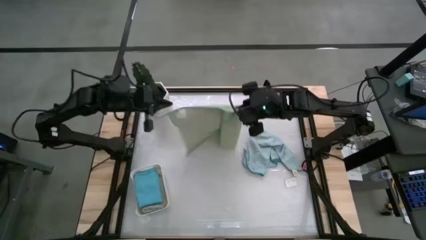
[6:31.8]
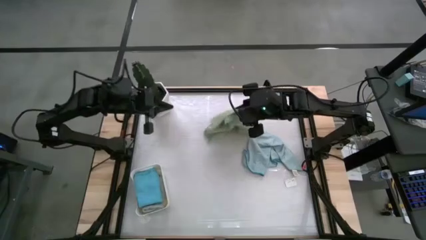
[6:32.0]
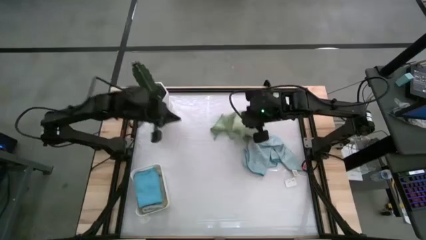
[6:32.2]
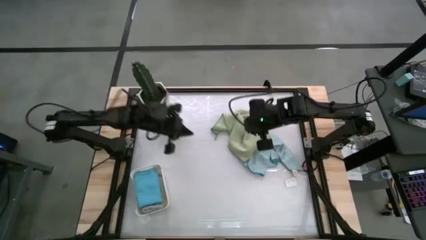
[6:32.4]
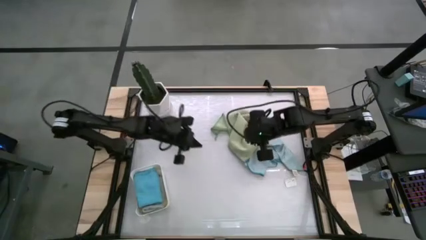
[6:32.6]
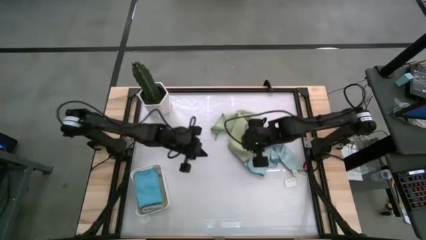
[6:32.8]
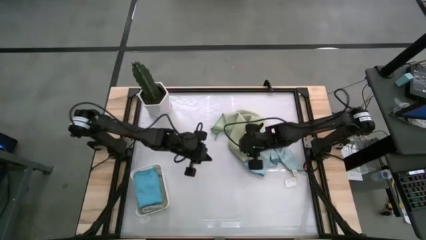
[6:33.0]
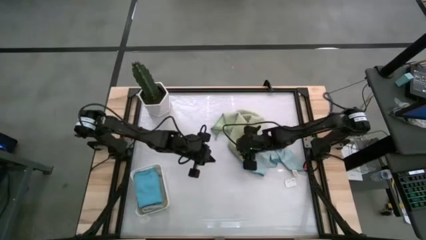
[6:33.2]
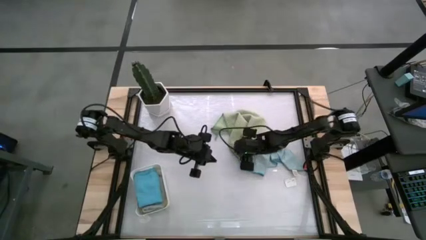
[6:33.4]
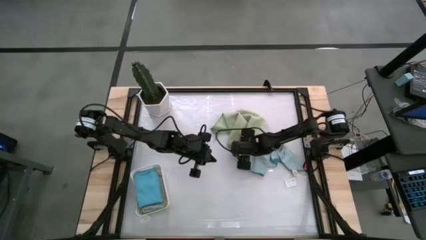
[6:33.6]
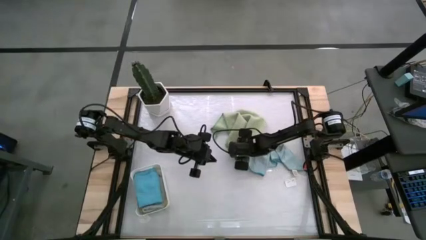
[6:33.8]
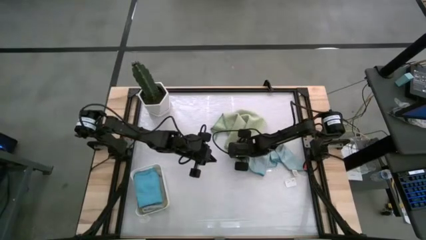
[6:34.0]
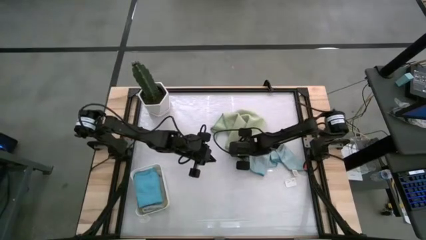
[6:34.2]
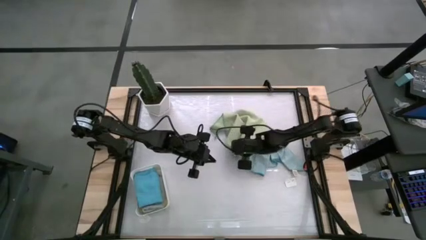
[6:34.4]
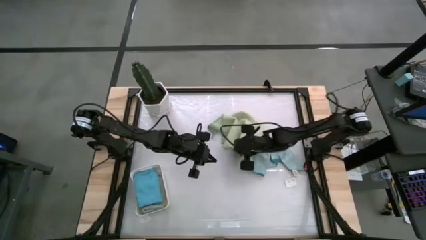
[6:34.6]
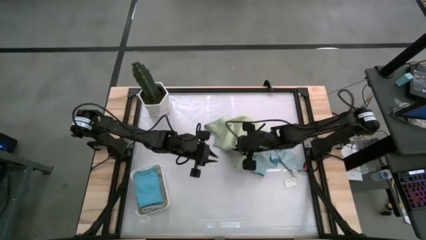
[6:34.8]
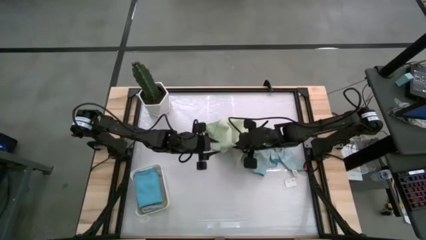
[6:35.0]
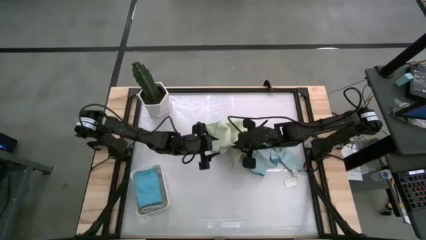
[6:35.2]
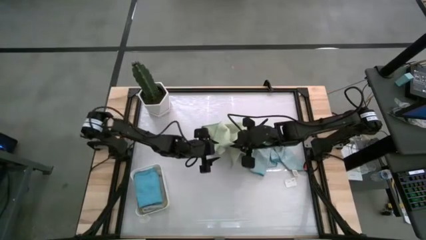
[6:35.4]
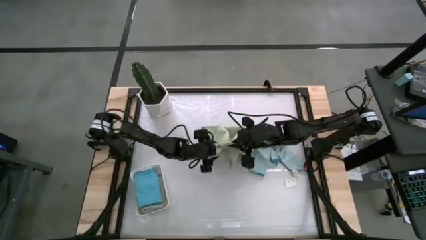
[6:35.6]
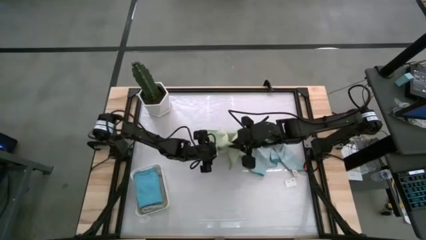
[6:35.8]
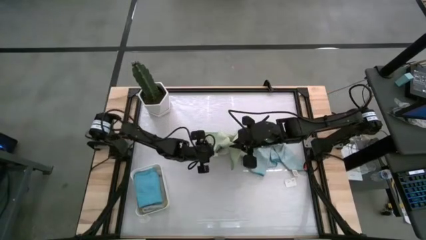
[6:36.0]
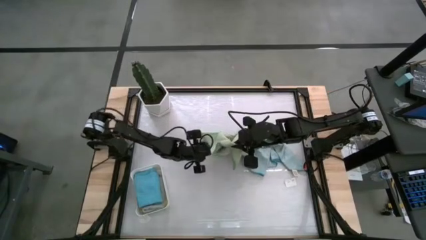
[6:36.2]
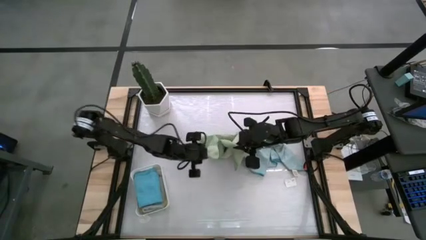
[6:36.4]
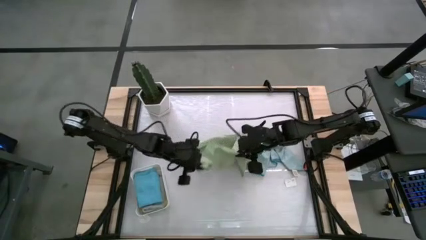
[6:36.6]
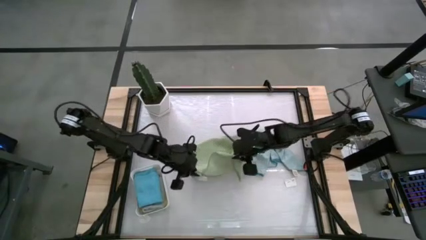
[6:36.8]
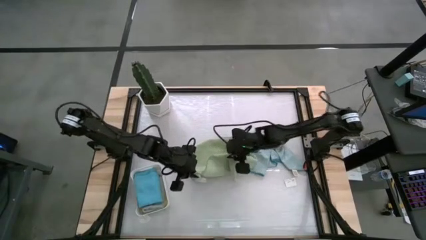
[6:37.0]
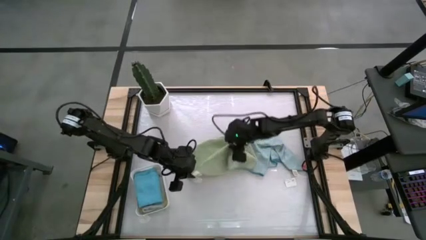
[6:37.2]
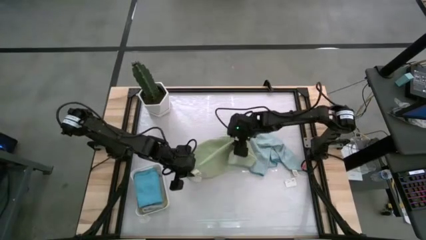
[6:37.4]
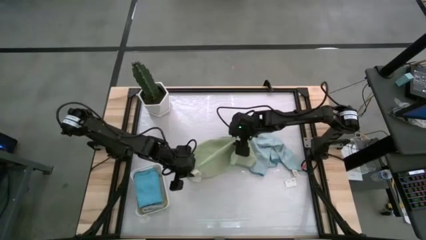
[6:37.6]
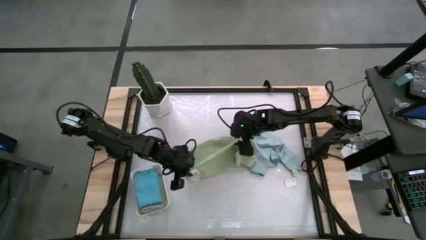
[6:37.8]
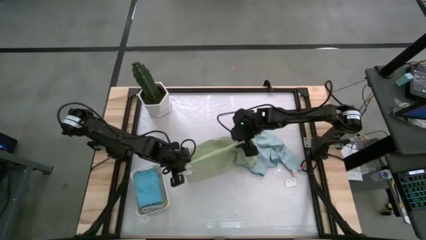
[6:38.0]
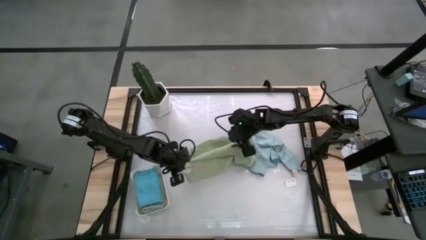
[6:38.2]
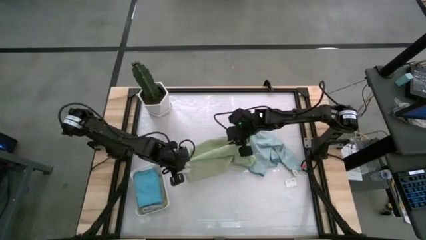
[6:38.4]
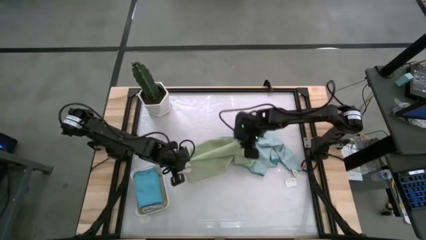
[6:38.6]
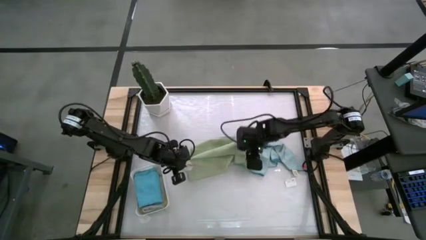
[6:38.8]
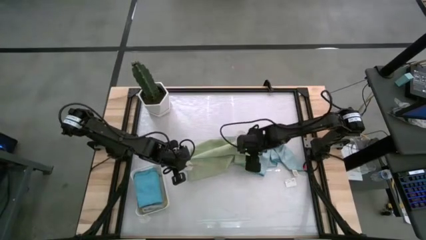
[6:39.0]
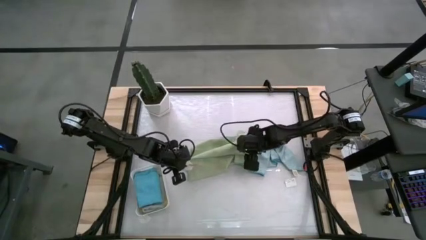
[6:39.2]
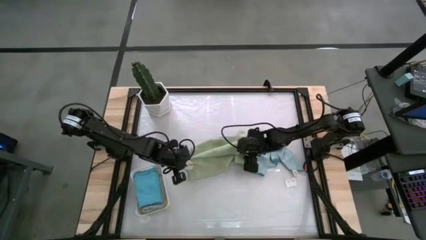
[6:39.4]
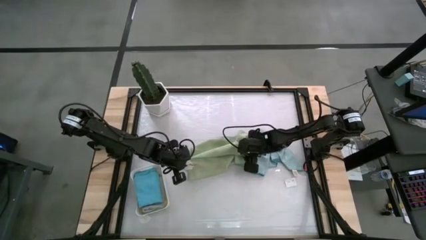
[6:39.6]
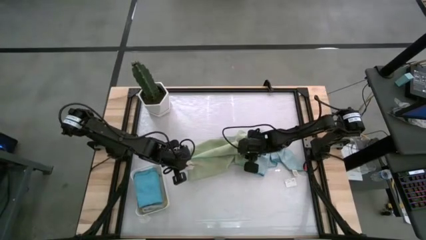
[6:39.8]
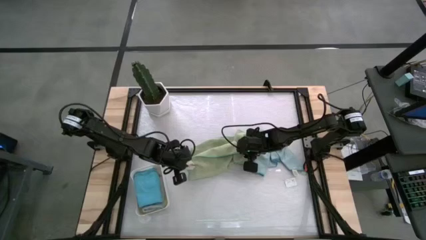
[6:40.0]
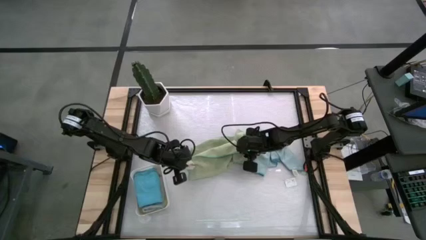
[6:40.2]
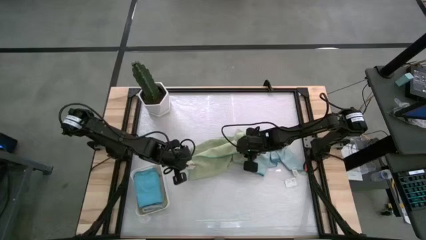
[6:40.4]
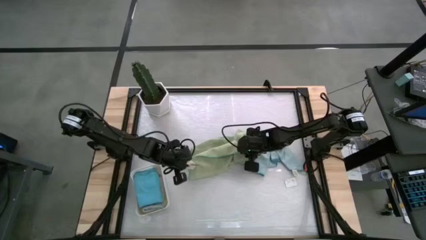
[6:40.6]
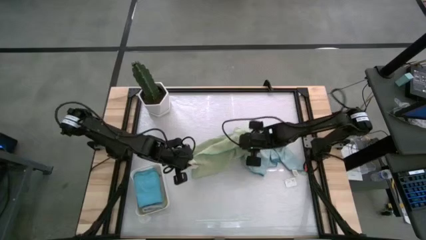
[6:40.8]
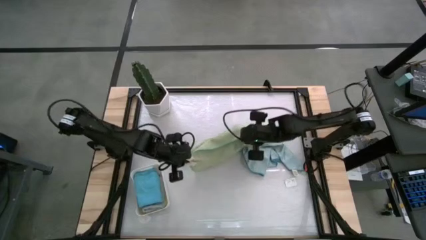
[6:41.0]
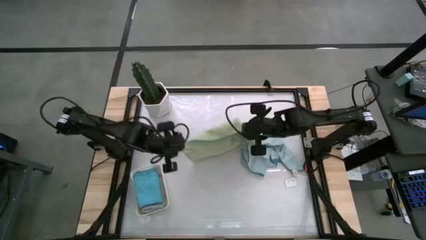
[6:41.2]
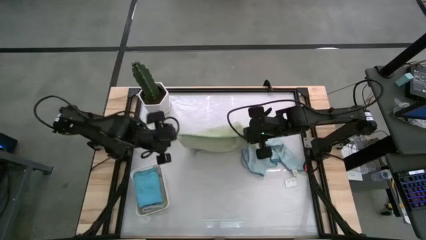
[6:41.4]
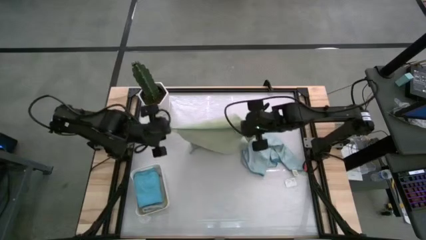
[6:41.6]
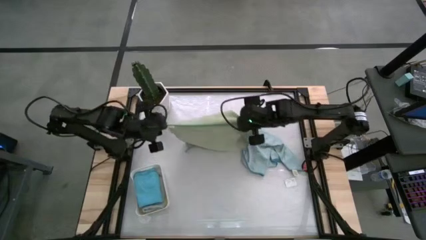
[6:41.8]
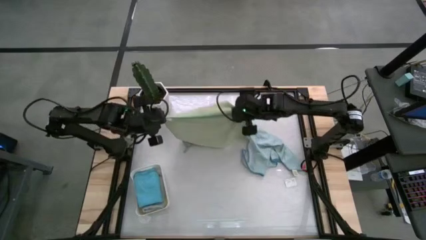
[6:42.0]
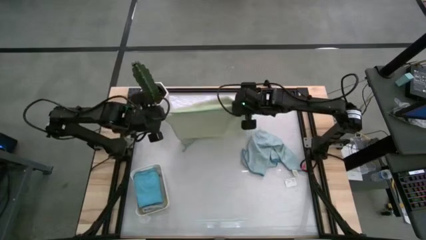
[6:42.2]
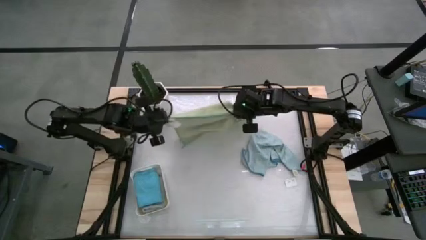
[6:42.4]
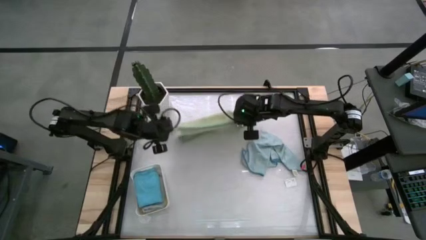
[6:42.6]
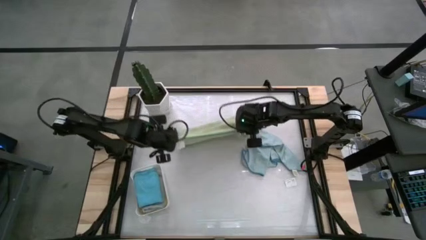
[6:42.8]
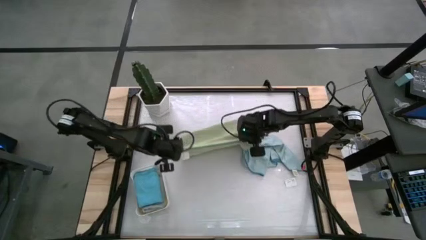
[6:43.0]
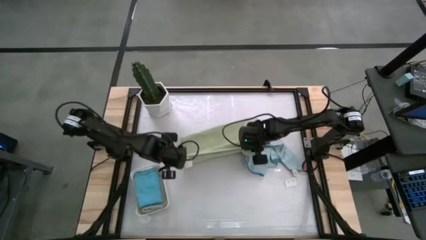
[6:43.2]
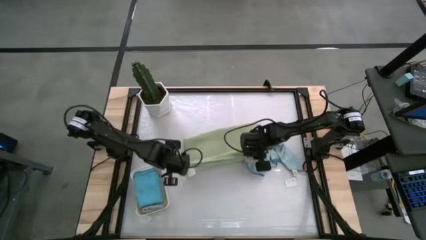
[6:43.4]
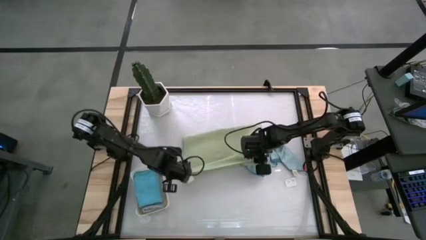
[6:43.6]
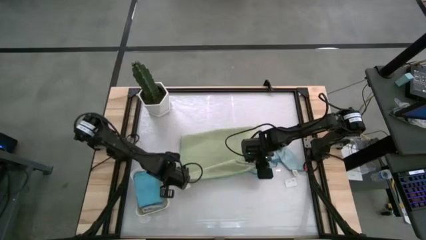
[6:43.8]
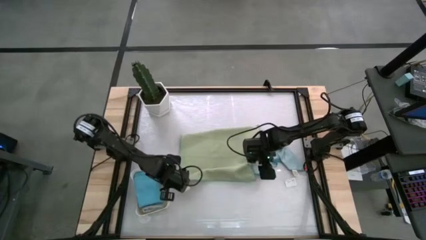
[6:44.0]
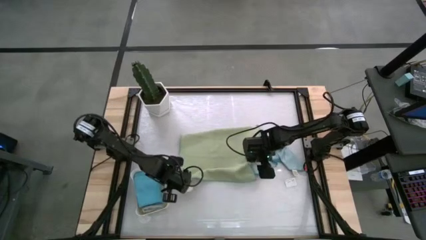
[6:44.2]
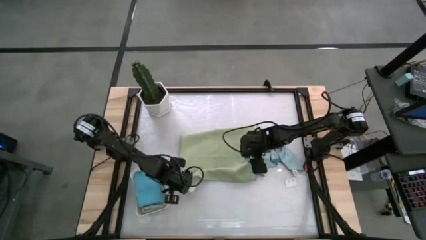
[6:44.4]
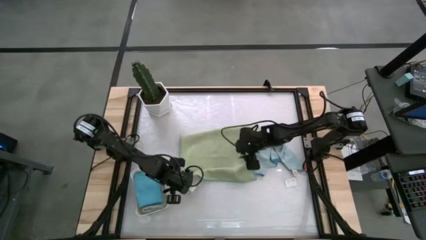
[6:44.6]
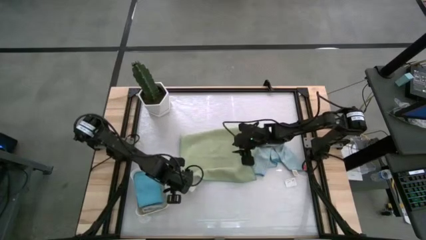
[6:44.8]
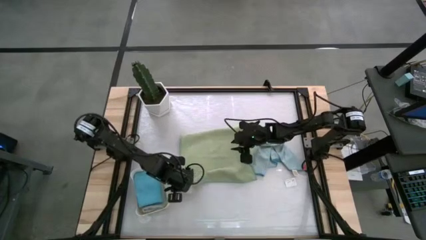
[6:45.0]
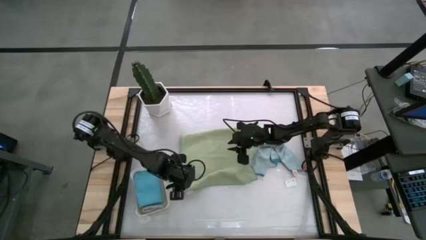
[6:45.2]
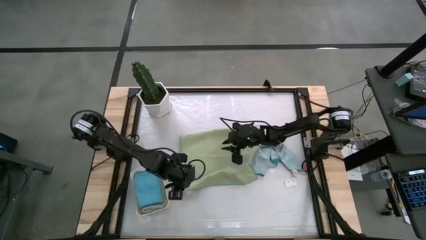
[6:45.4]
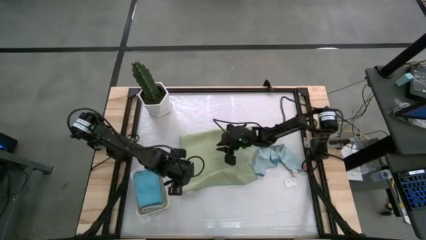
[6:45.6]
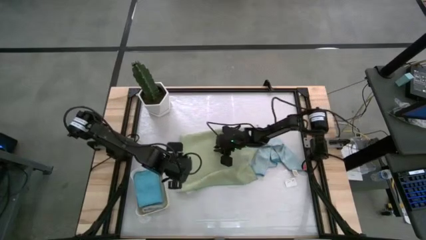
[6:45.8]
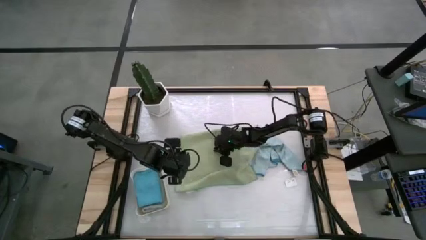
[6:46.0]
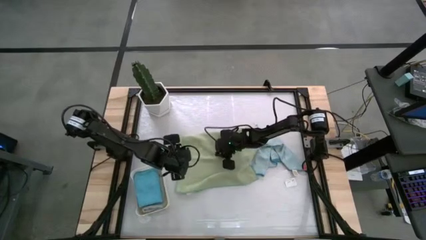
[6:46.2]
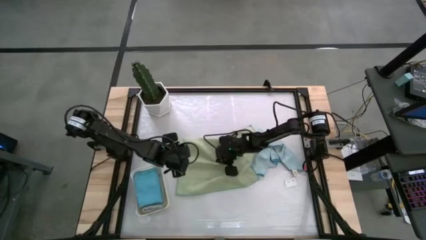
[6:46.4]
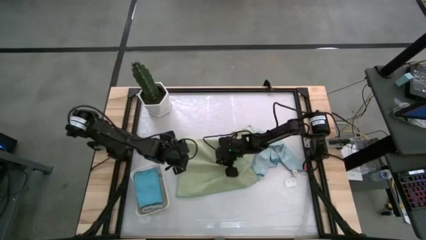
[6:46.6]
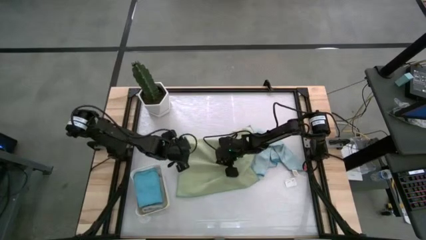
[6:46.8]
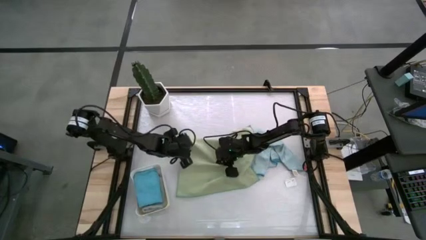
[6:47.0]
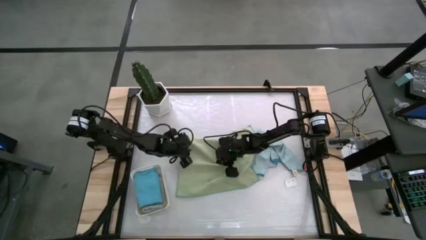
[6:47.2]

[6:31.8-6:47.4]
Task: Fold microfiber towels
Fold the green microfiber towel
